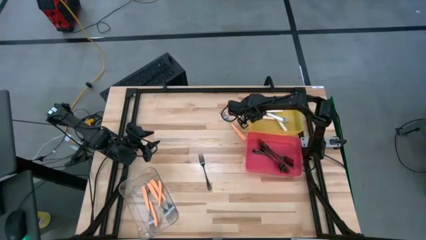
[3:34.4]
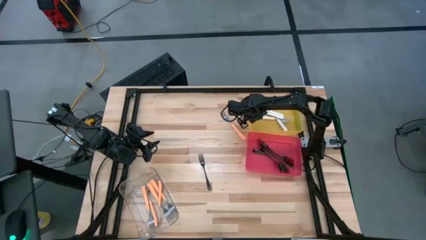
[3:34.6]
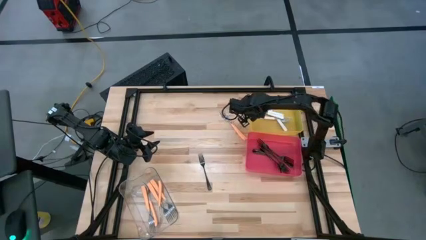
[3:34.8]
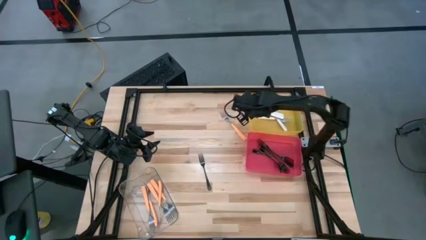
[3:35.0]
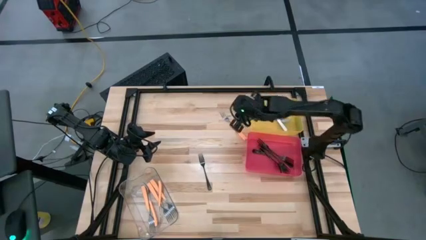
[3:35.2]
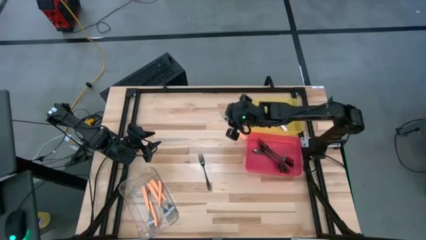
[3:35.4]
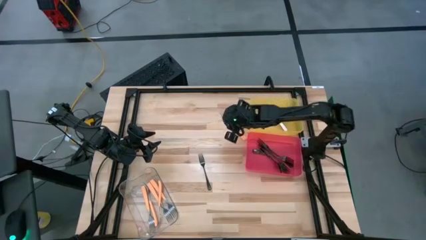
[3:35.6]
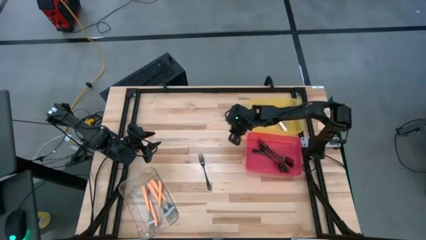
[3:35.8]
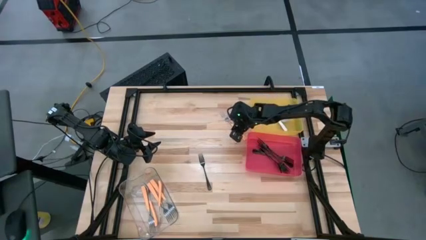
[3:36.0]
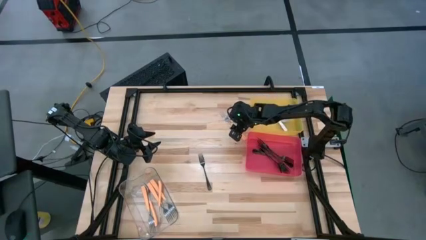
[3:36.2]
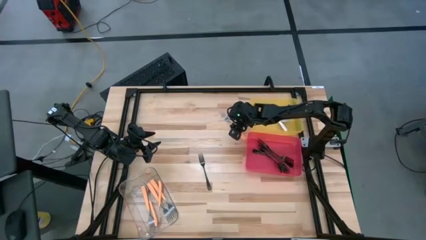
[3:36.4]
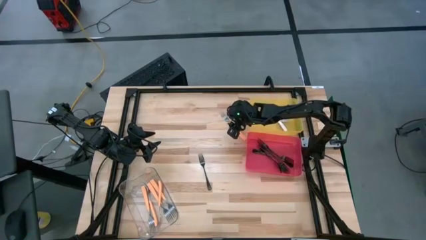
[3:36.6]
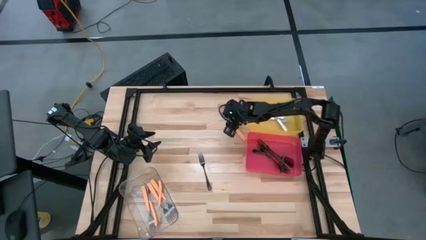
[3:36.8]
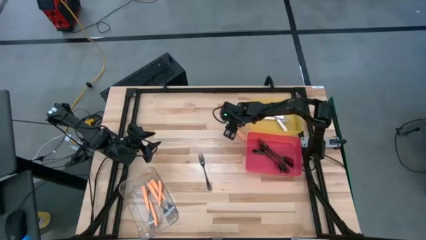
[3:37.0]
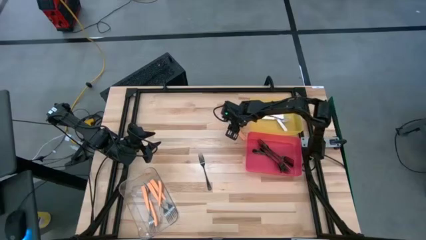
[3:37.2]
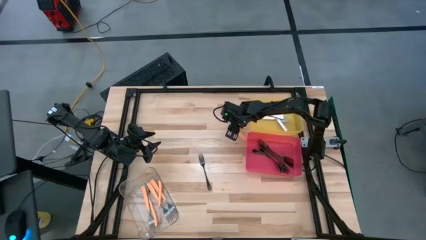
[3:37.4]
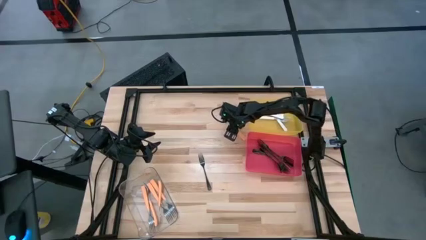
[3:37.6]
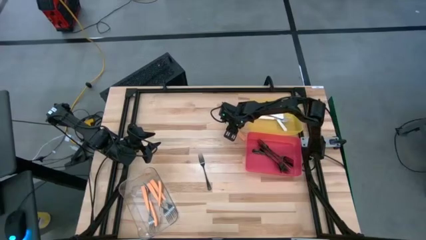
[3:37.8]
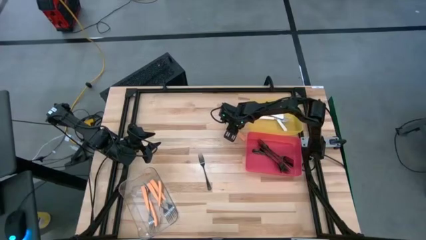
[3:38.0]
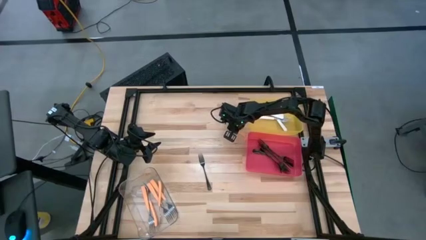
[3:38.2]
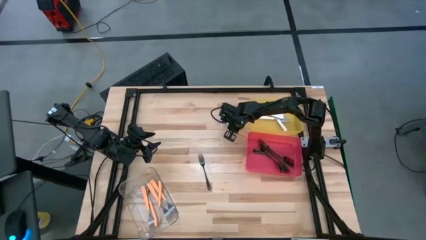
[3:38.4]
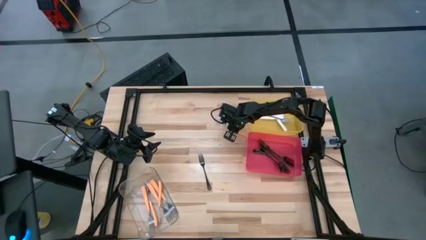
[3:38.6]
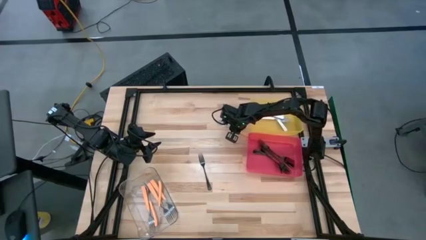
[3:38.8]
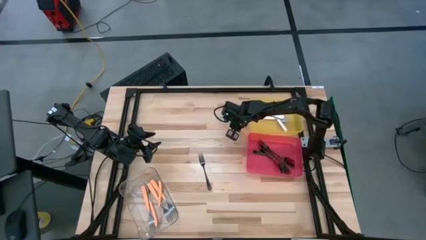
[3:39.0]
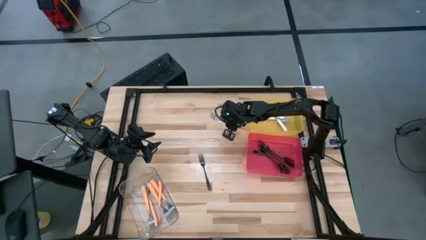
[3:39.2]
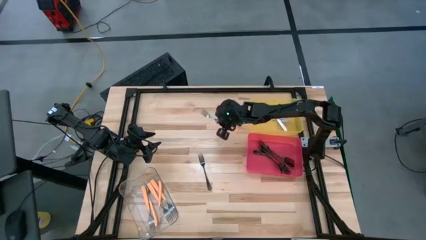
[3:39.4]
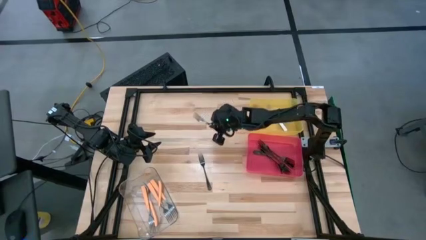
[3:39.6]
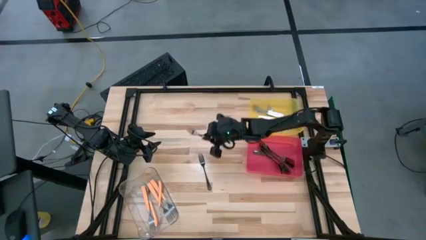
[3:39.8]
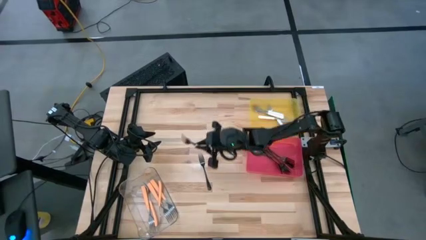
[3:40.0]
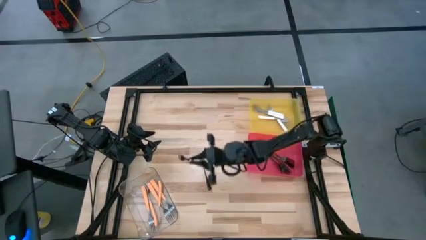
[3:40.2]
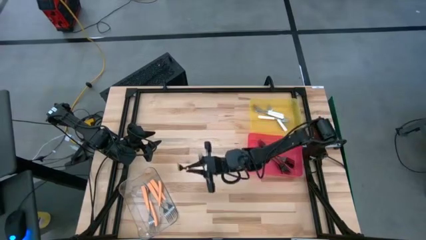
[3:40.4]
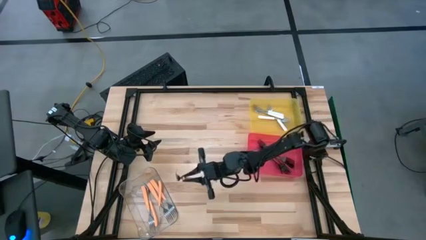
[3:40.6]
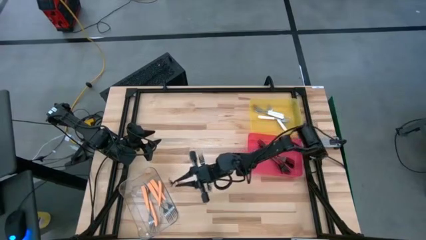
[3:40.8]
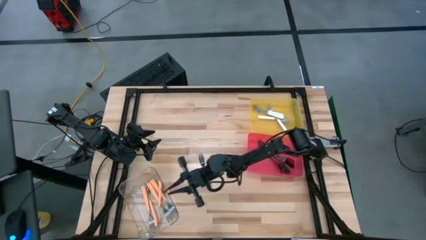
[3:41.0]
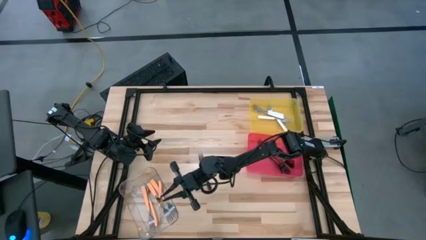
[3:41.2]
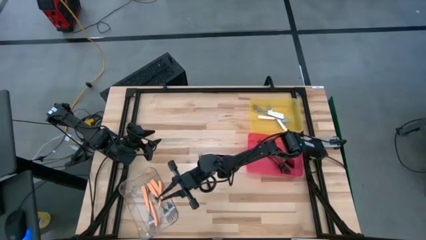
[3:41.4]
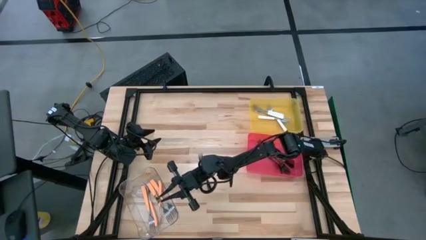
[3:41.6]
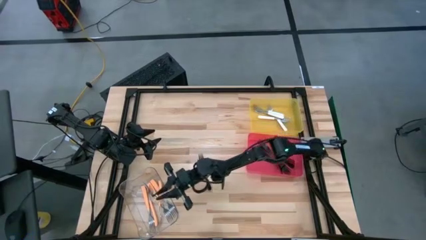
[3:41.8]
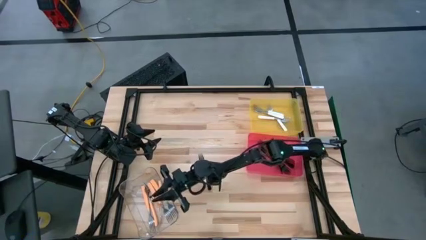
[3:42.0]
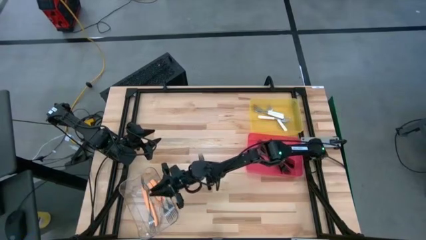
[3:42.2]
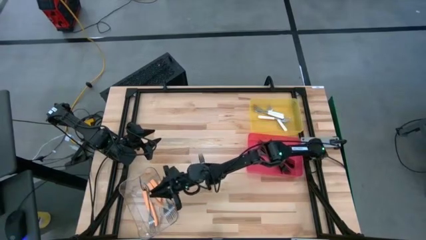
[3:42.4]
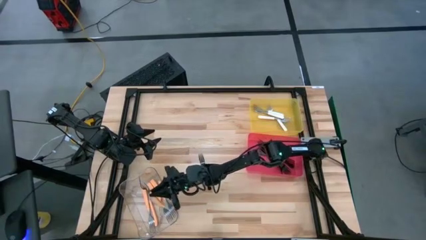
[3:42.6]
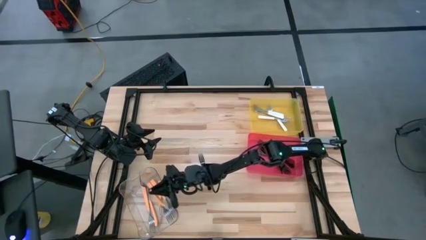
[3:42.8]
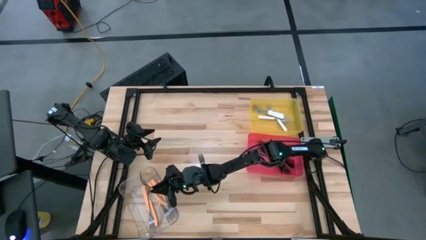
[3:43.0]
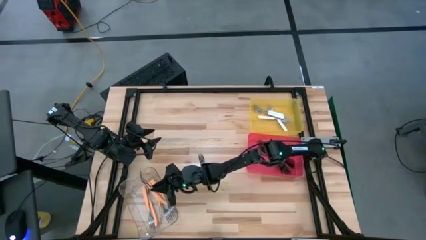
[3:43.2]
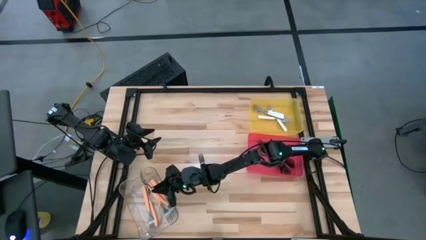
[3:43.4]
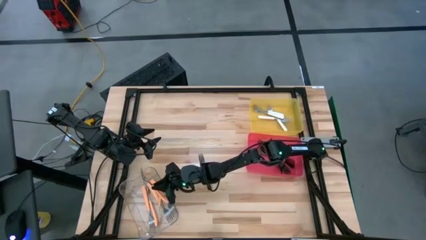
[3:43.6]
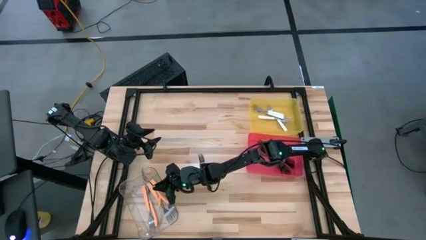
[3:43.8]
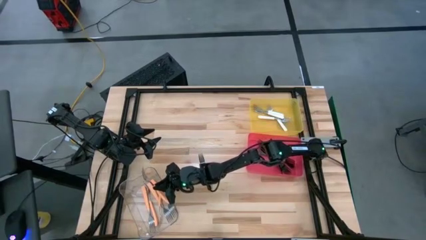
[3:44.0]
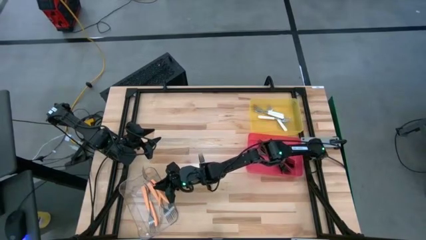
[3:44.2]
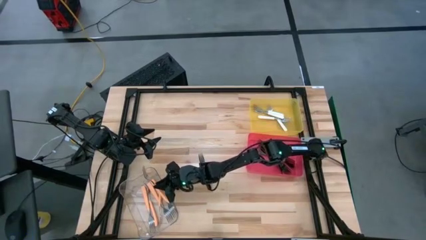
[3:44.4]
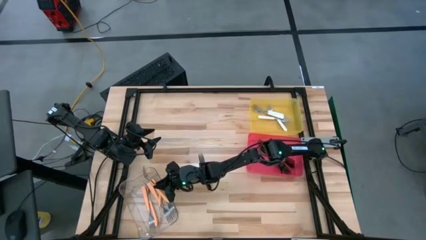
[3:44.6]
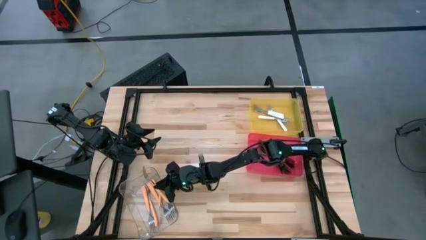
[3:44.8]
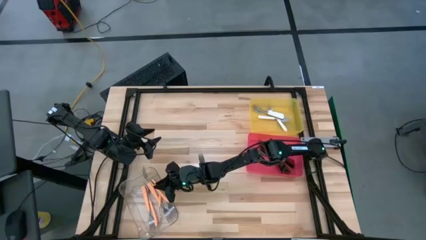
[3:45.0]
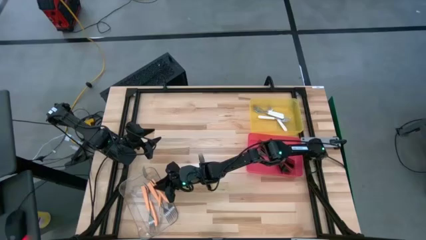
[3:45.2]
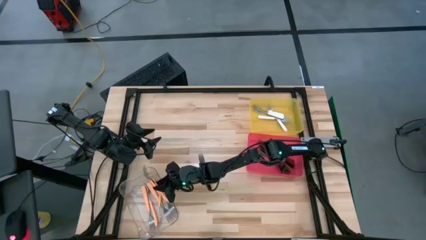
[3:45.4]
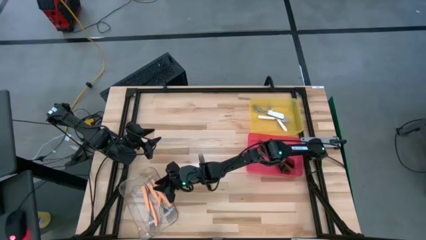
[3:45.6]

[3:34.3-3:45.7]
Task: Sort silverware by color (type)
Put the orange fork into the transparent bin

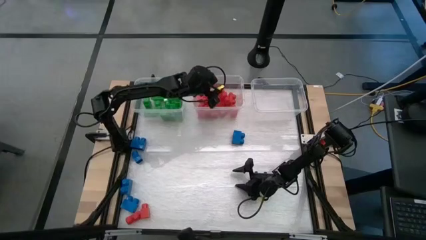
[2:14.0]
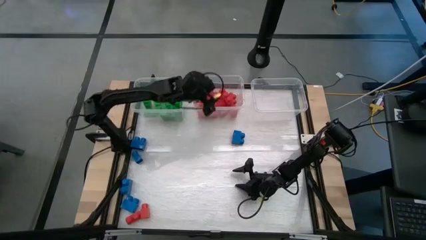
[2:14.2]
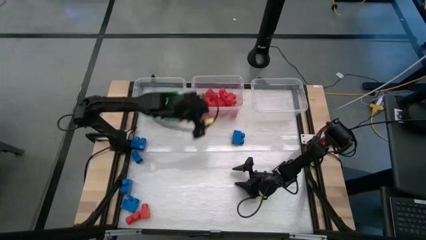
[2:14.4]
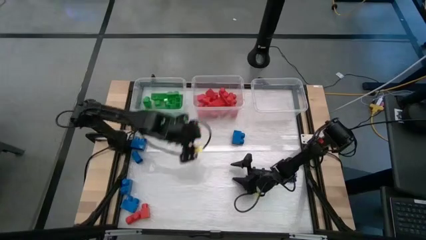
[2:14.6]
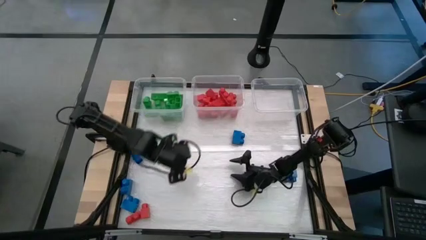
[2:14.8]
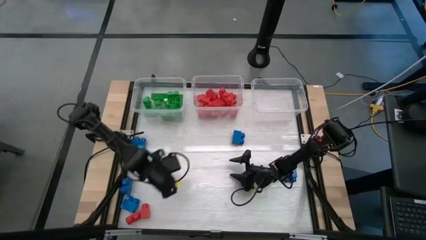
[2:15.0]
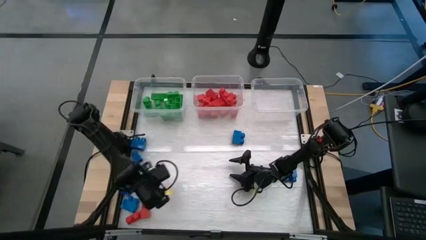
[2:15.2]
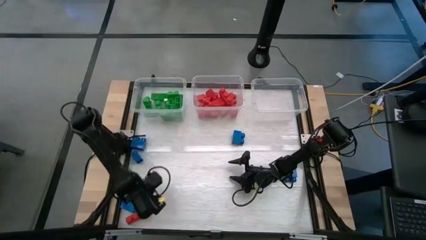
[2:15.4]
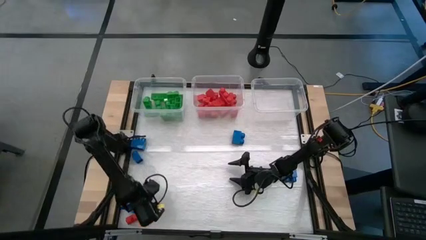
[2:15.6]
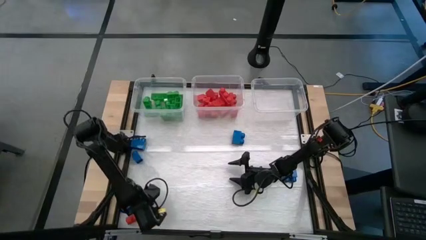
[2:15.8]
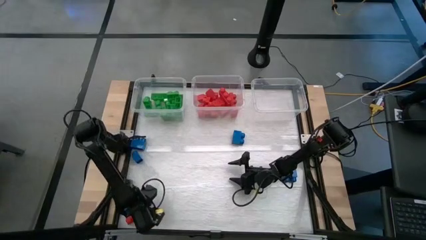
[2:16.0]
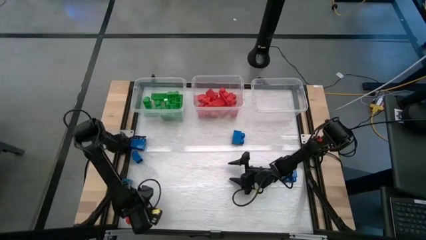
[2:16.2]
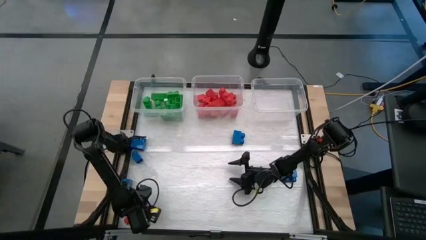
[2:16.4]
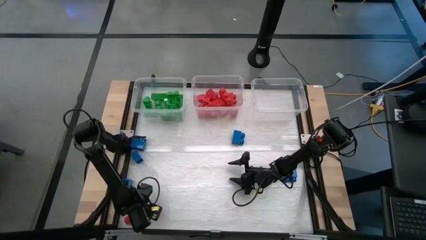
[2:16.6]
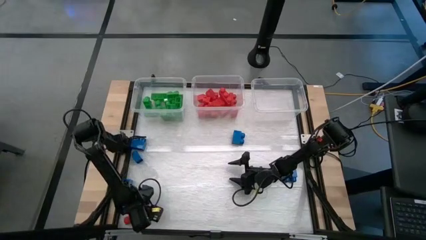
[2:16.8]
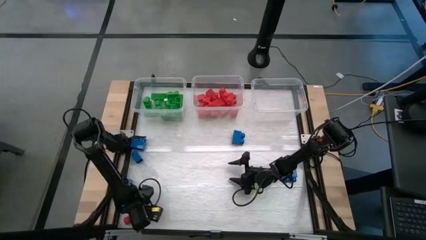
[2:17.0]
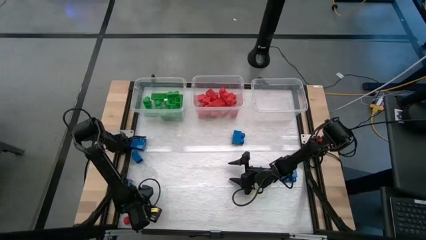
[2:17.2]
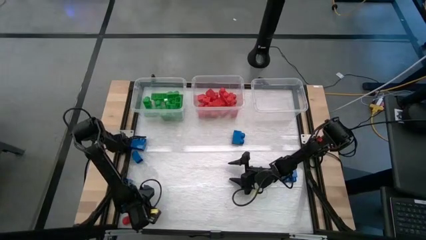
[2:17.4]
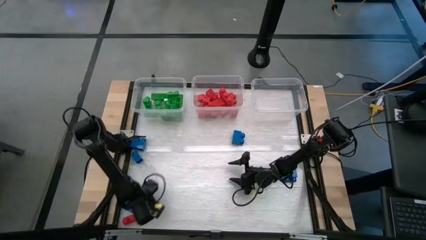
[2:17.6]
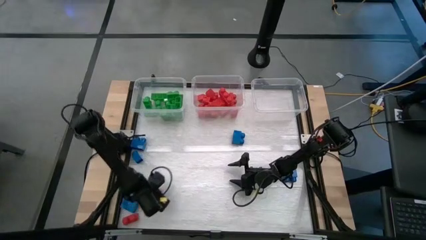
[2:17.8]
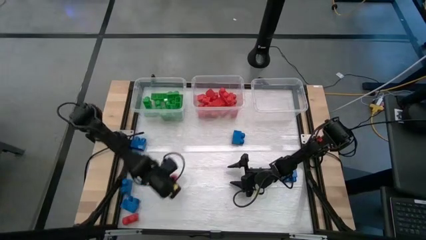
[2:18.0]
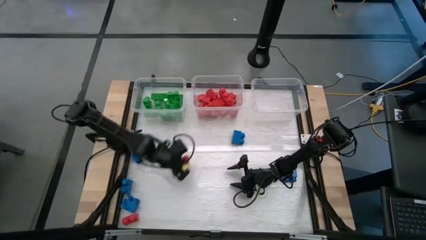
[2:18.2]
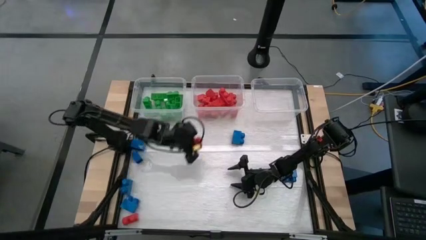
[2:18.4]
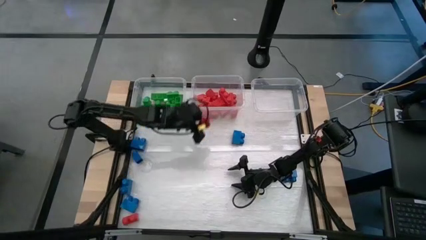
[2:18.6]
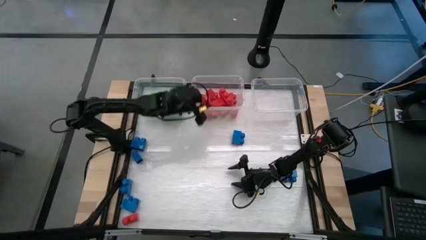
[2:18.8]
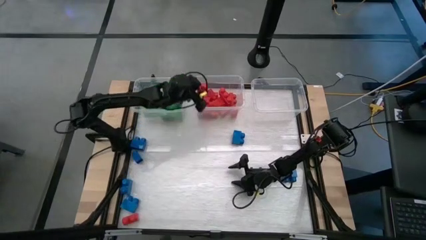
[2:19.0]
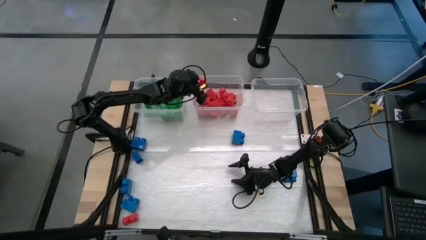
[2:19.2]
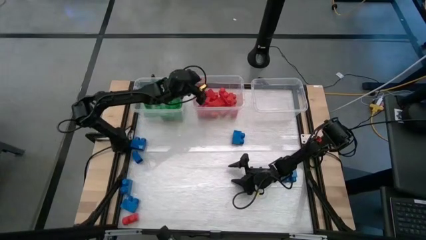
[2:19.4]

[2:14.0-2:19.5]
Task: Sort blocks
Put the red game piece into the middle transparent bin
